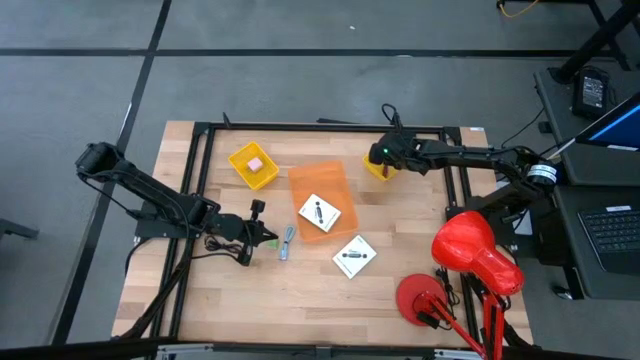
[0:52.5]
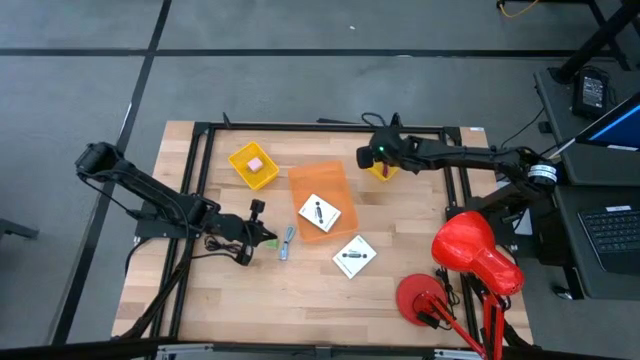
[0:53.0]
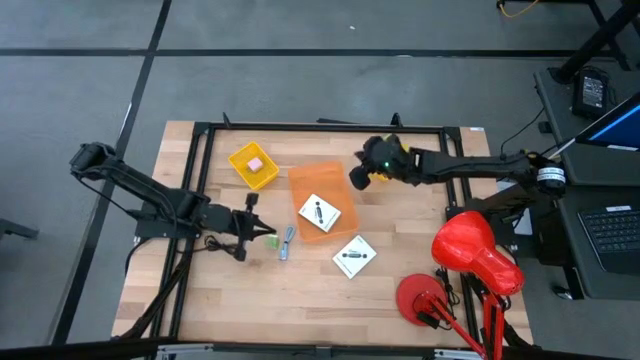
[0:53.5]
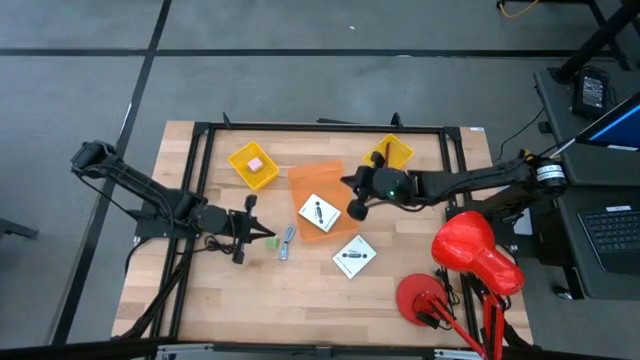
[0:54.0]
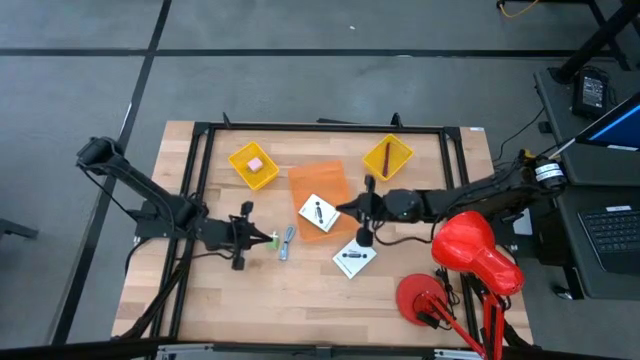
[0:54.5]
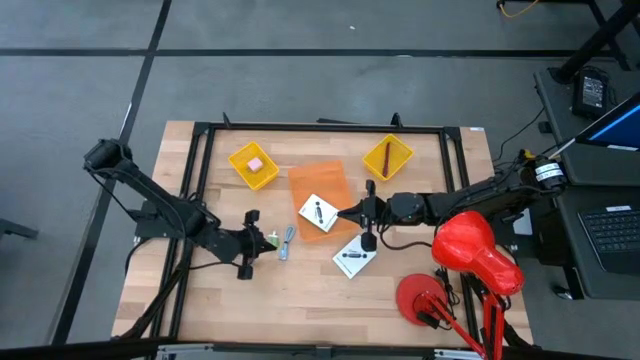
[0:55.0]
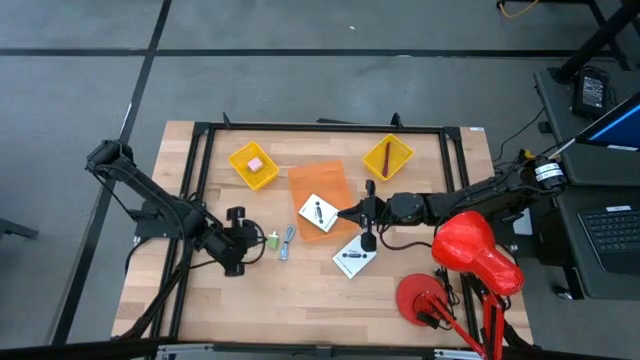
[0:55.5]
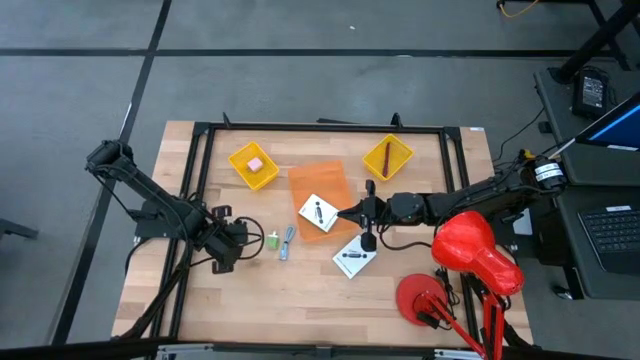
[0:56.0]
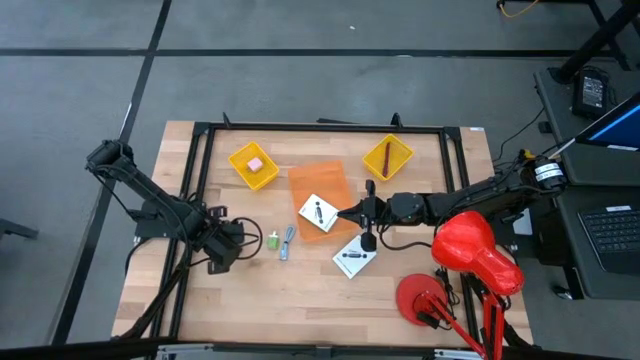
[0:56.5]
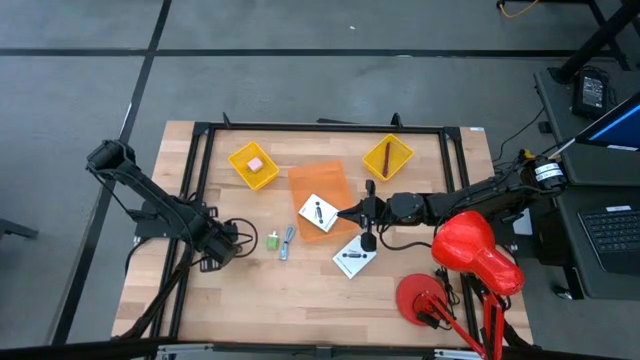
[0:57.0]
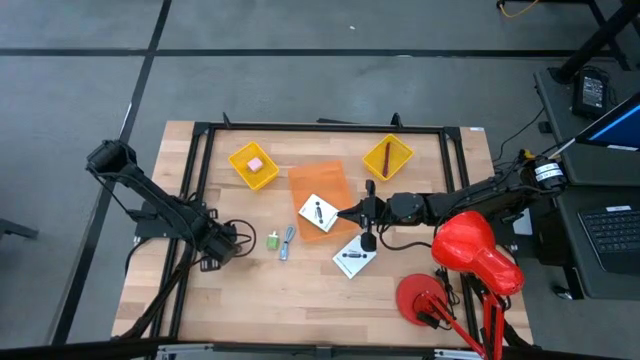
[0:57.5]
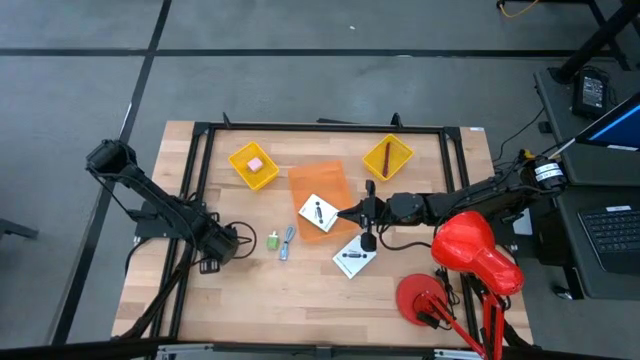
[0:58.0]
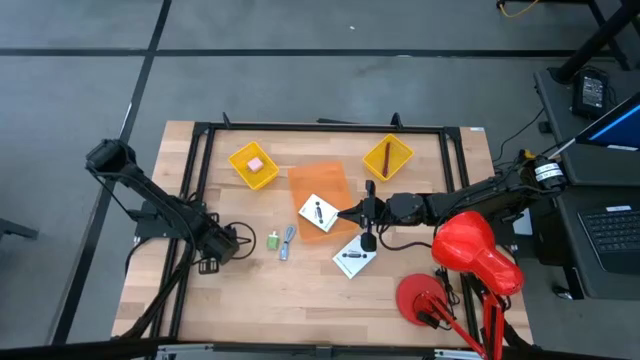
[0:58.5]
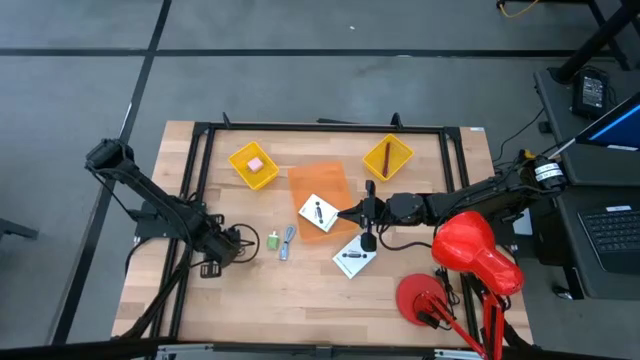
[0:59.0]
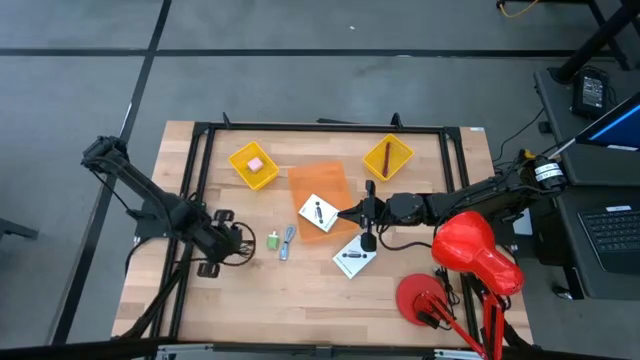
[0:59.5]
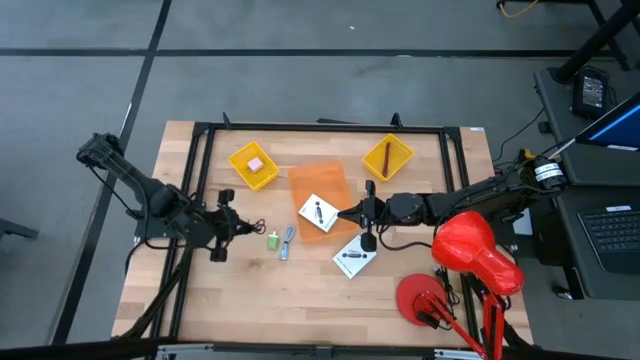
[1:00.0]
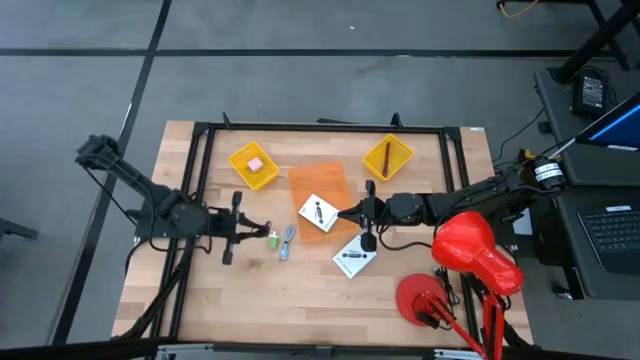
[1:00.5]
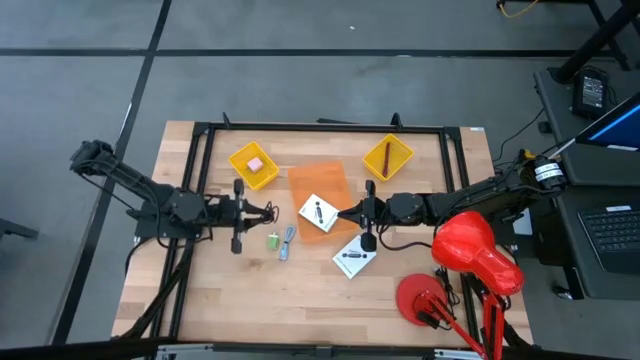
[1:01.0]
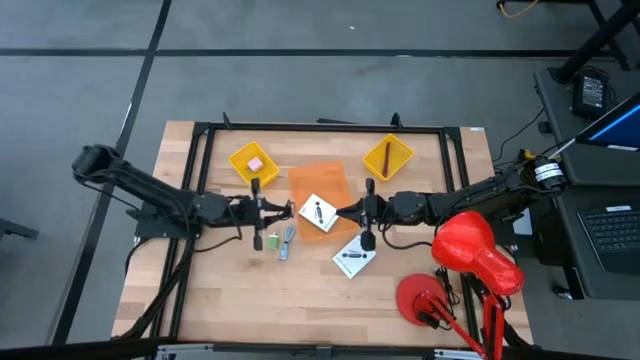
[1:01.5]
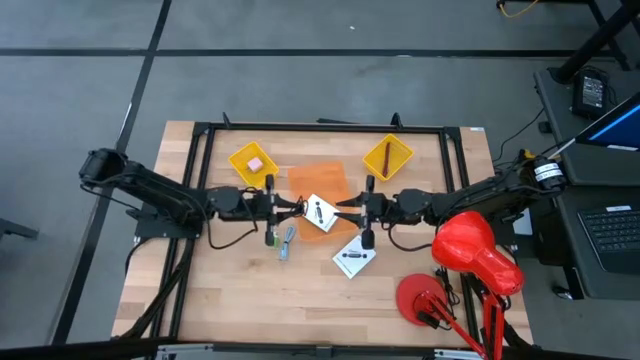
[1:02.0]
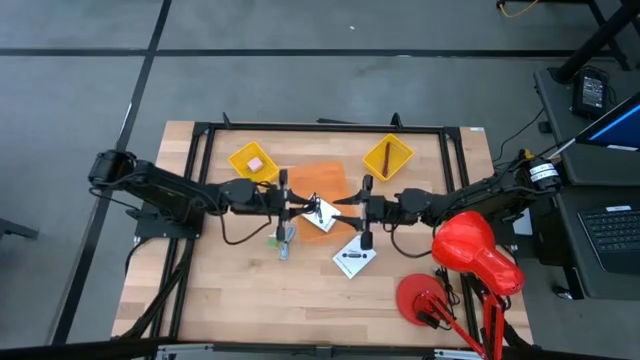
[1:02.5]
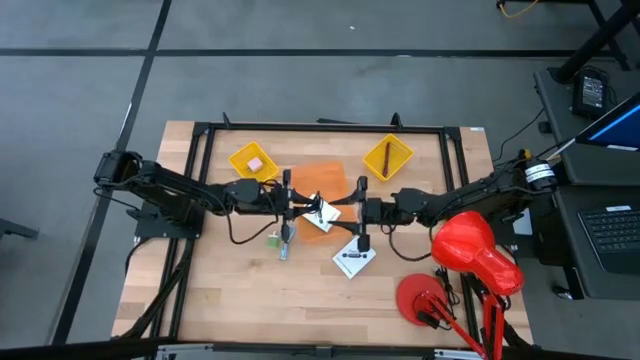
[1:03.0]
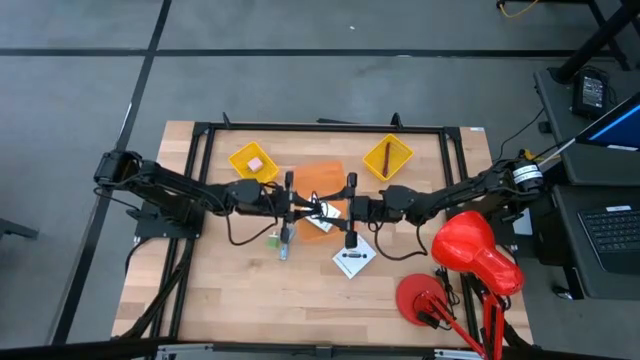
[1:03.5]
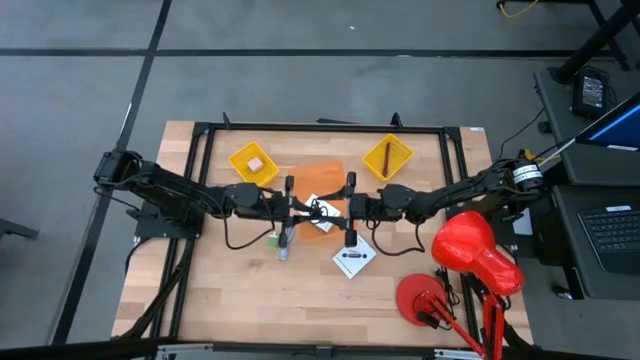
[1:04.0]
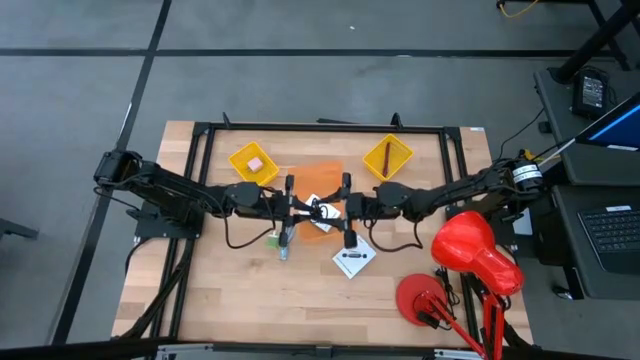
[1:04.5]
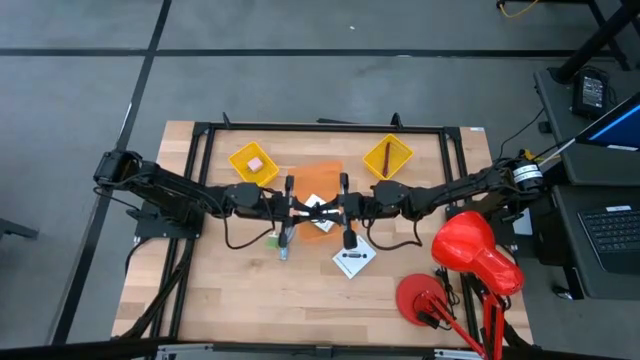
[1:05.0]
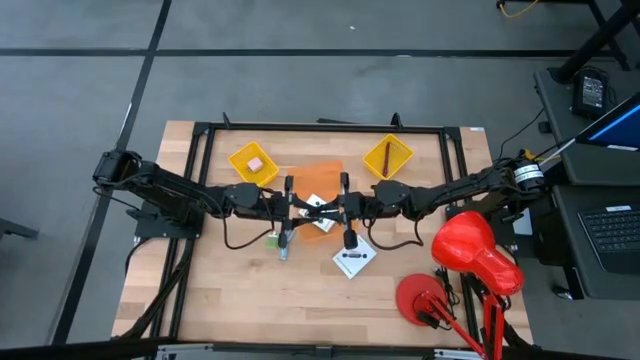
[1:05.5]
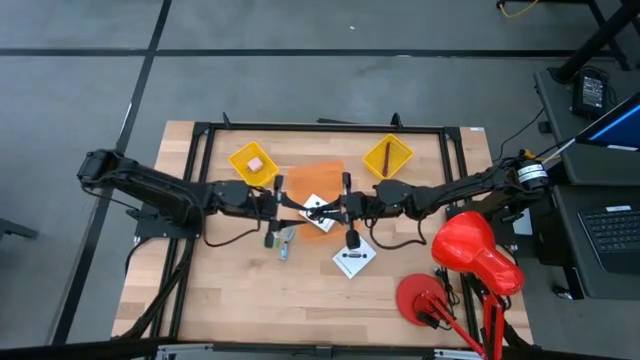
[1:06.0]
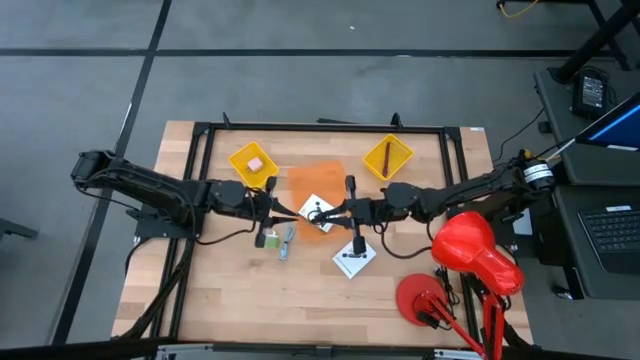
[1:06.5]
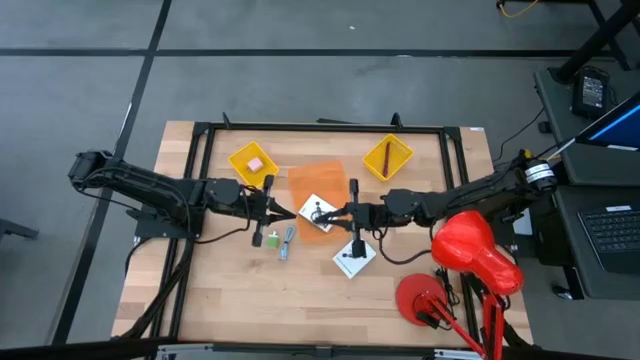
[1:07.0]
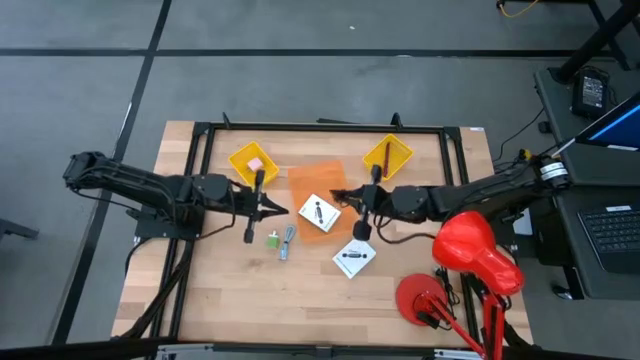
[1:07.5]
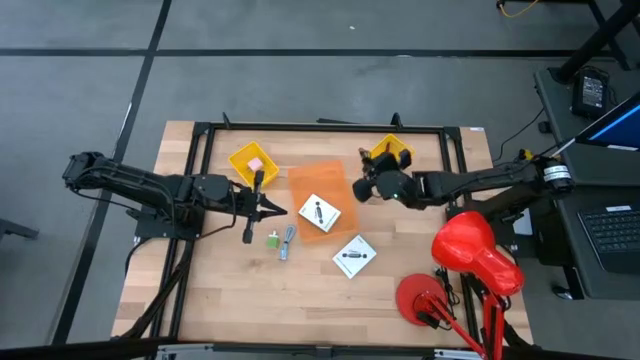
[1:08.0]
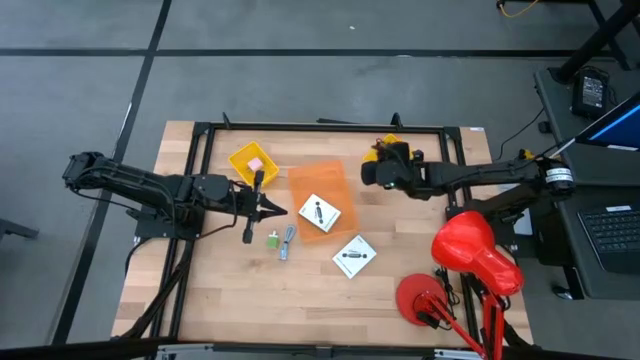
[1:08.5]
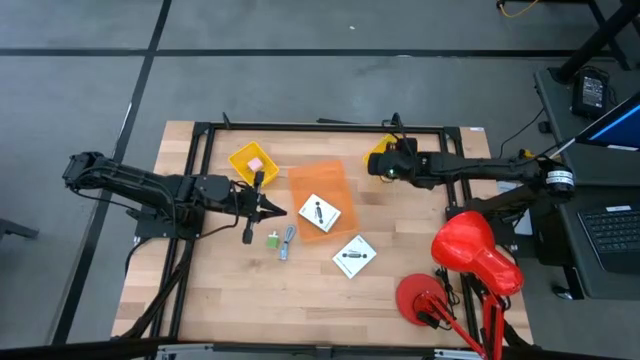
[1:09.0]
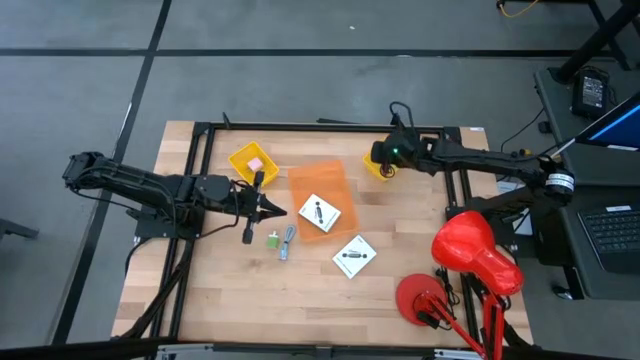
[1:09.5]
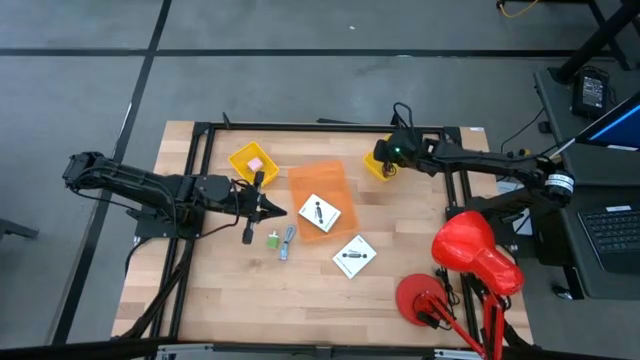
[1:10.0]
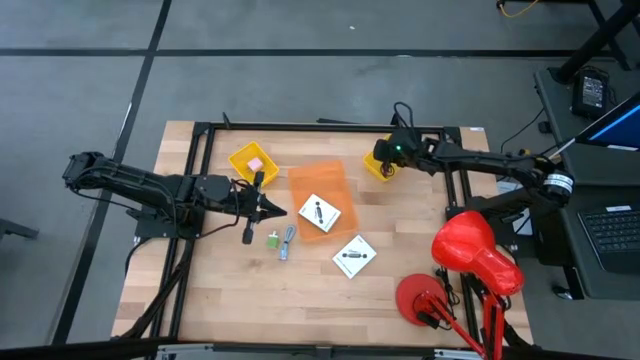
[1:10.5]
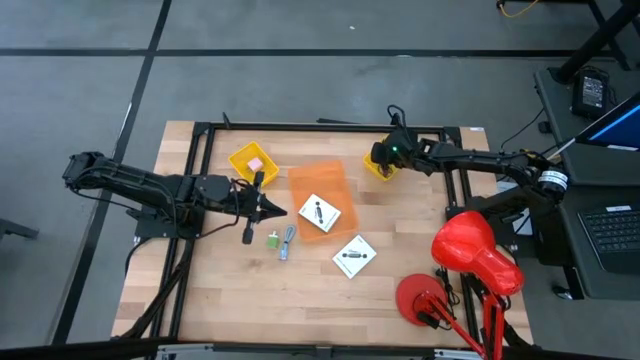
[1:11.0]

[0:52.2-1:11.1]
Task: Pick and place items into bin
Put the black charger cable into the right yellow bin

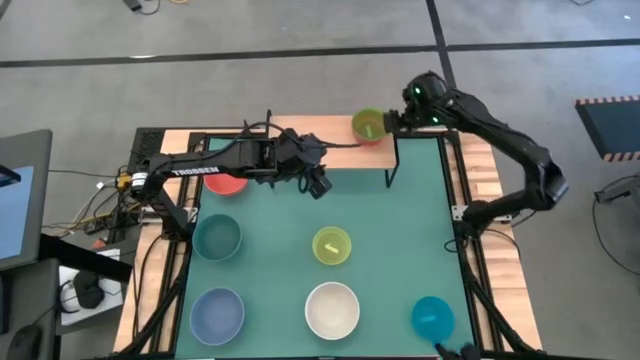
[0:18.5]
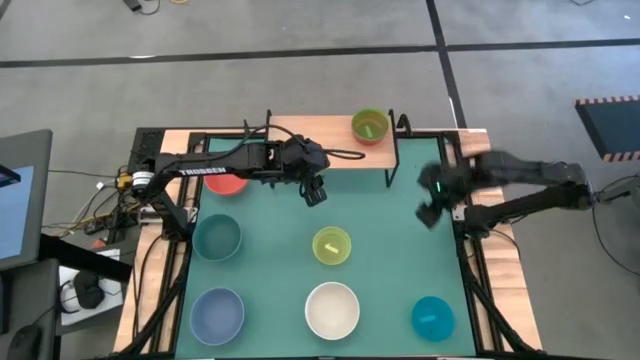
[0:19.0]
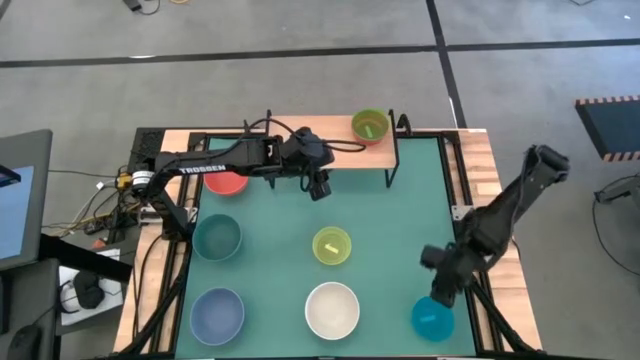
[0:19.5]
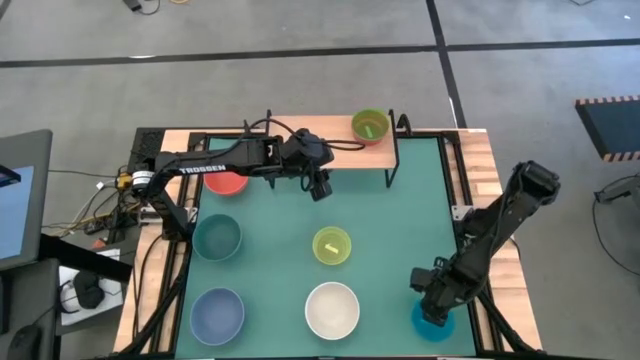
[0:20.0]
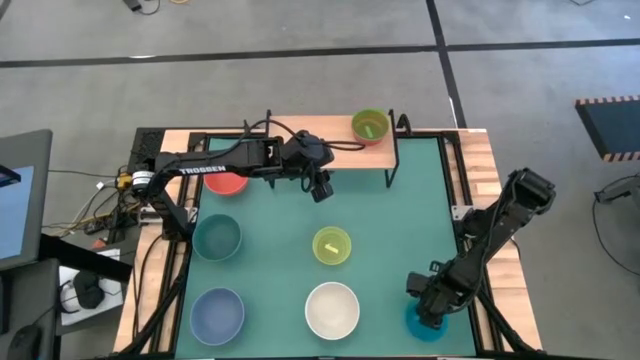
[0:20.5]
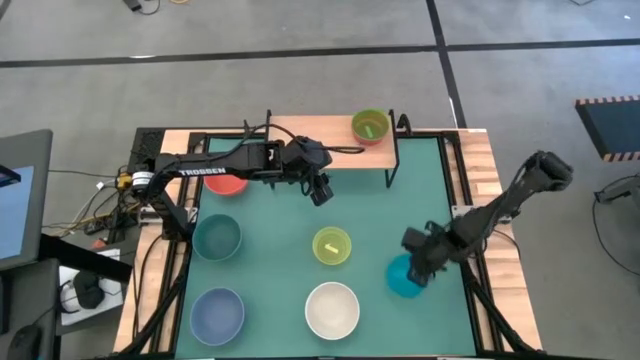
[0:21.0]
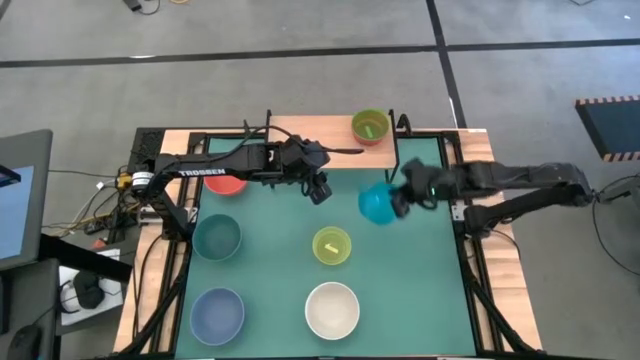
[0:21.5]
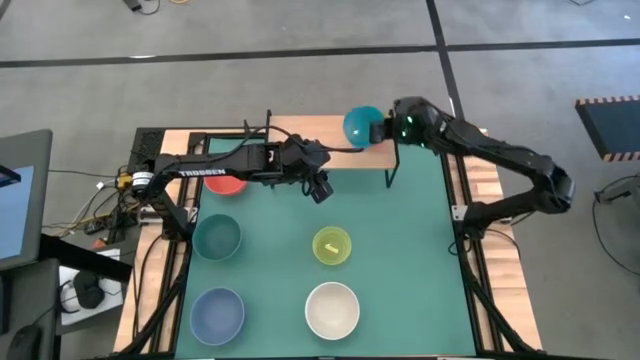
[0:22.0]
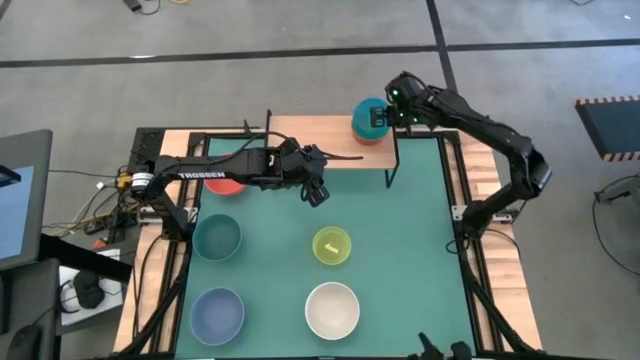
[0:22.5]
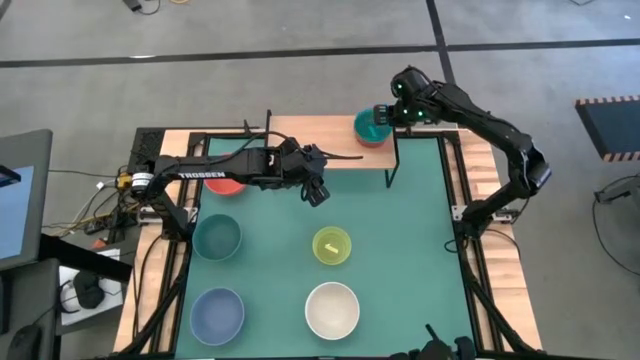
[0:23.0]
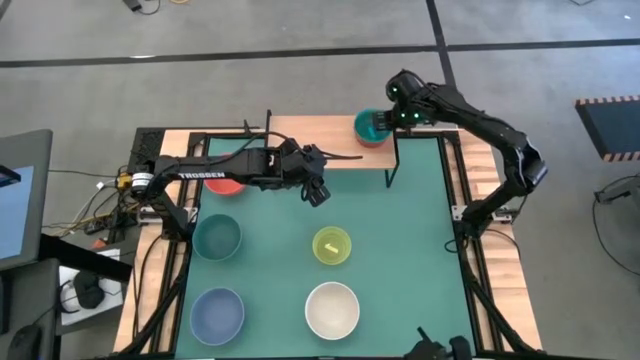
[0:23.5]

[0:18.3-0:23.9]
Task: Place and stack bowls onto a shelf
Stack the small blue bowl on top of the small green bowl on the shelf
